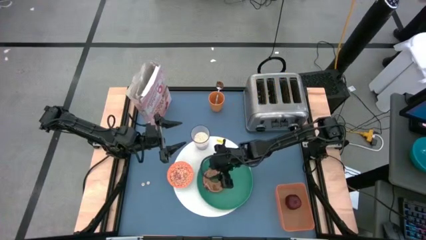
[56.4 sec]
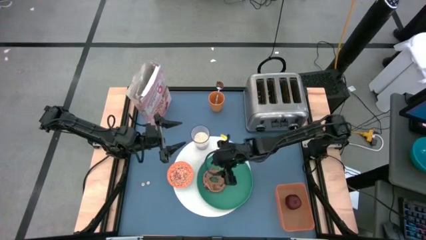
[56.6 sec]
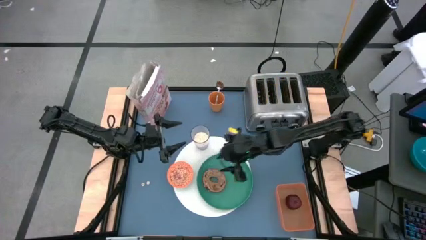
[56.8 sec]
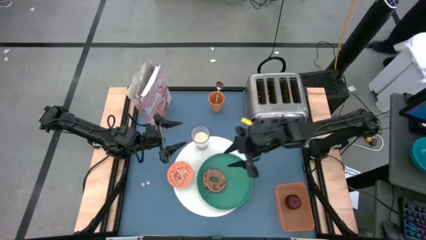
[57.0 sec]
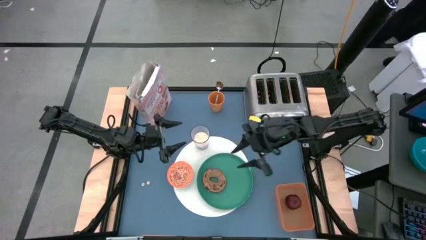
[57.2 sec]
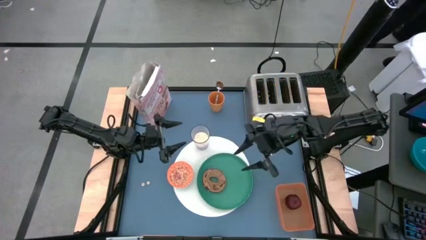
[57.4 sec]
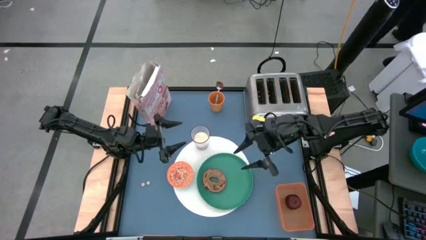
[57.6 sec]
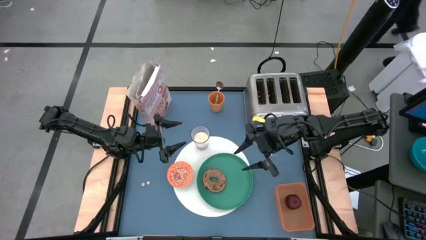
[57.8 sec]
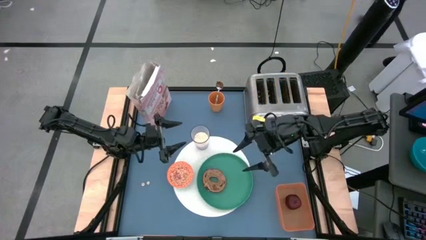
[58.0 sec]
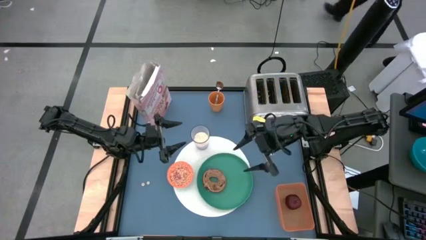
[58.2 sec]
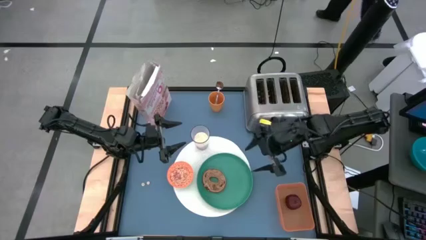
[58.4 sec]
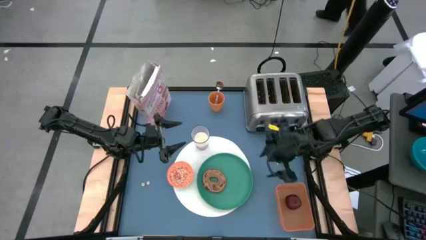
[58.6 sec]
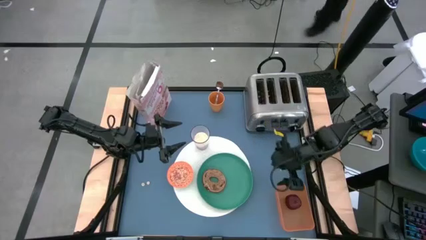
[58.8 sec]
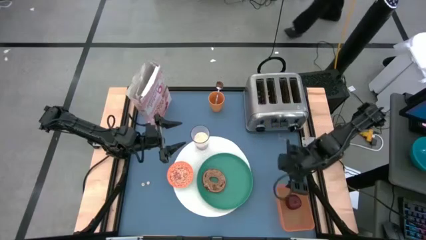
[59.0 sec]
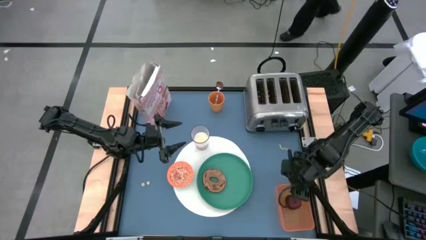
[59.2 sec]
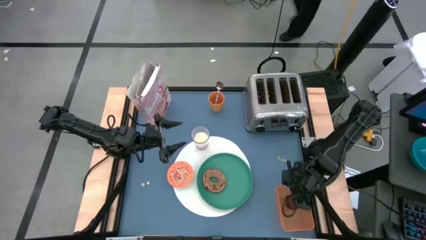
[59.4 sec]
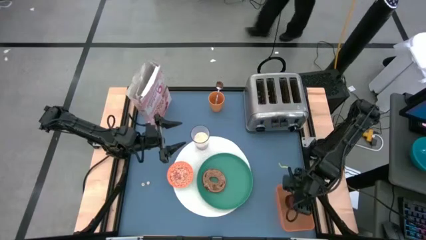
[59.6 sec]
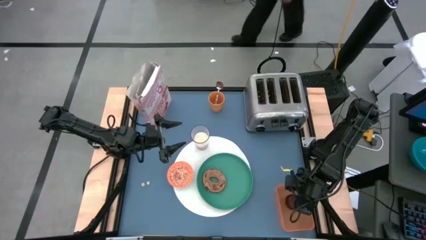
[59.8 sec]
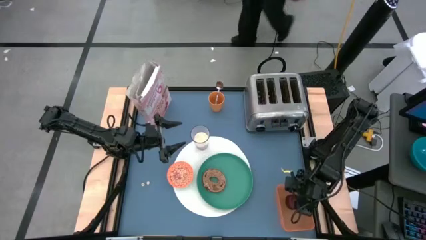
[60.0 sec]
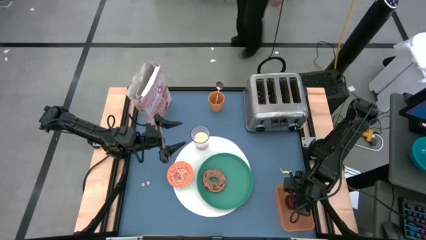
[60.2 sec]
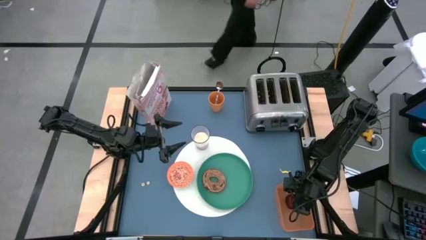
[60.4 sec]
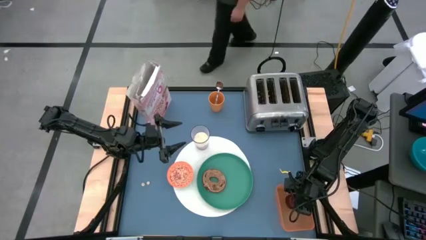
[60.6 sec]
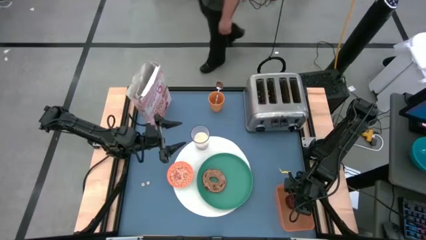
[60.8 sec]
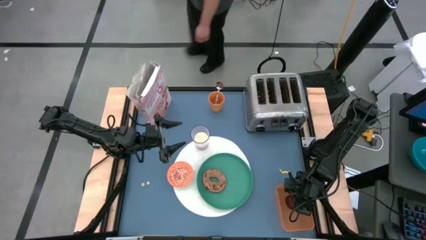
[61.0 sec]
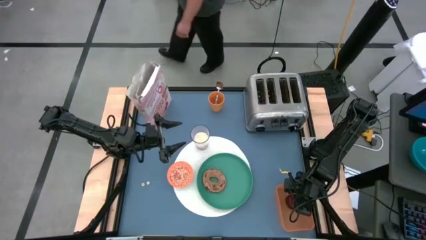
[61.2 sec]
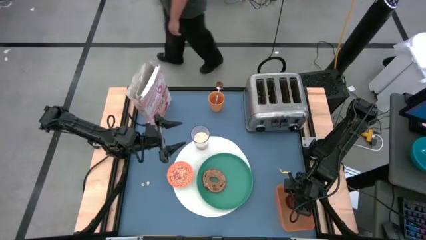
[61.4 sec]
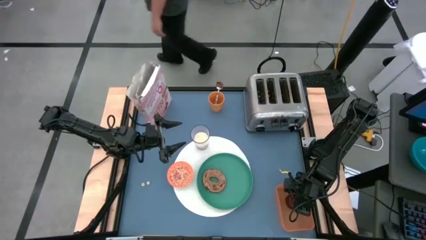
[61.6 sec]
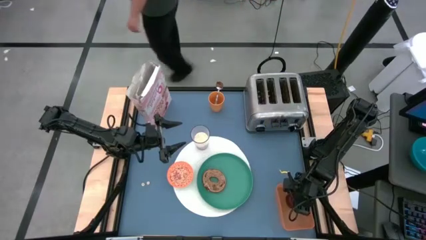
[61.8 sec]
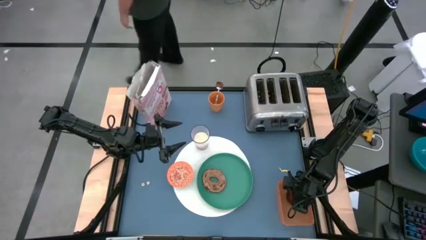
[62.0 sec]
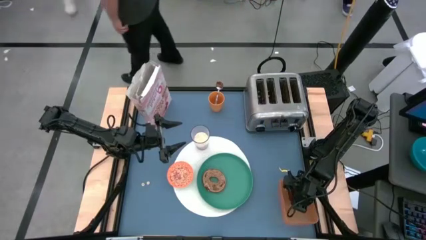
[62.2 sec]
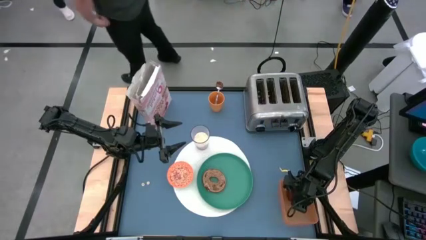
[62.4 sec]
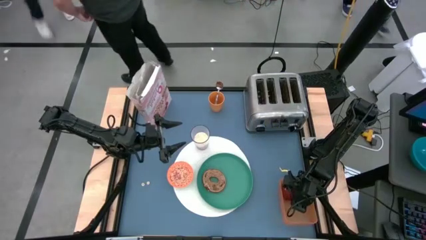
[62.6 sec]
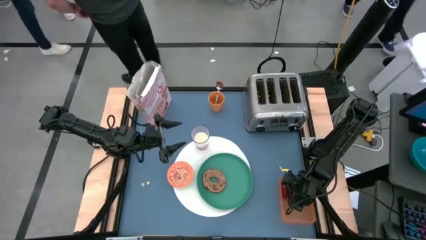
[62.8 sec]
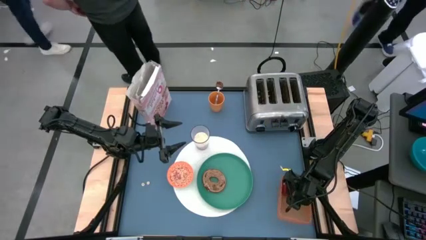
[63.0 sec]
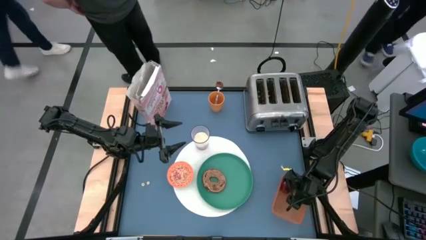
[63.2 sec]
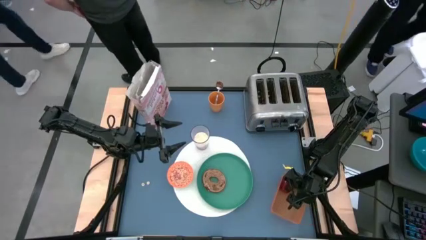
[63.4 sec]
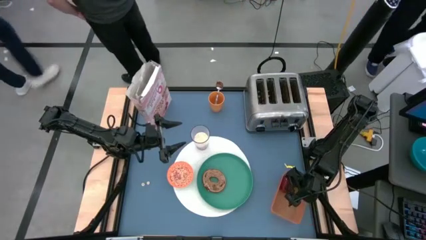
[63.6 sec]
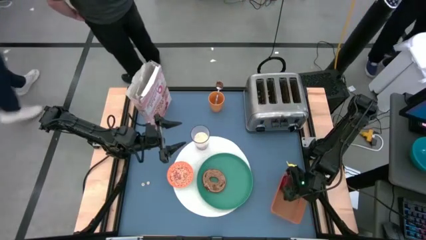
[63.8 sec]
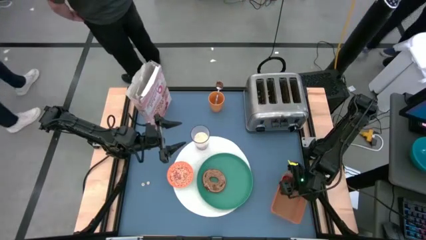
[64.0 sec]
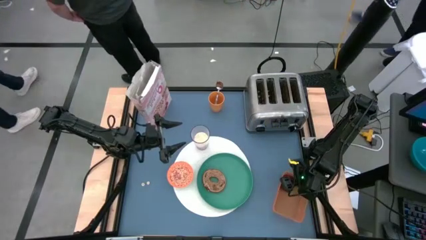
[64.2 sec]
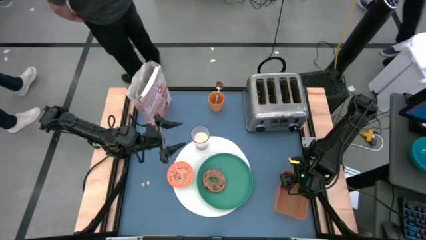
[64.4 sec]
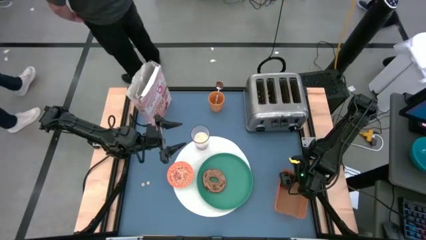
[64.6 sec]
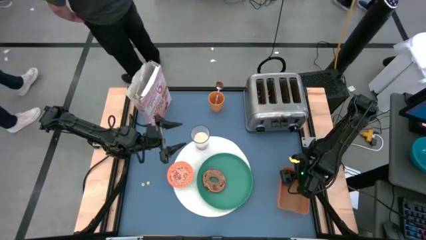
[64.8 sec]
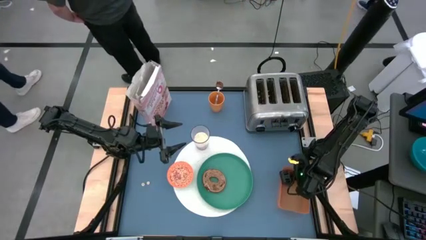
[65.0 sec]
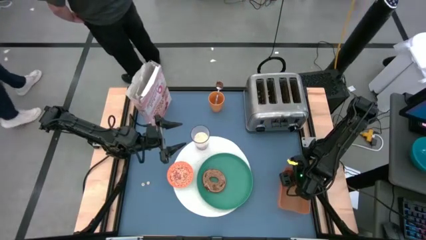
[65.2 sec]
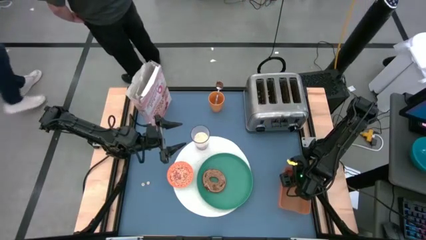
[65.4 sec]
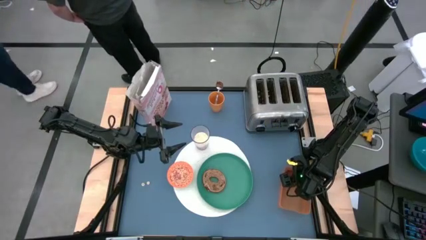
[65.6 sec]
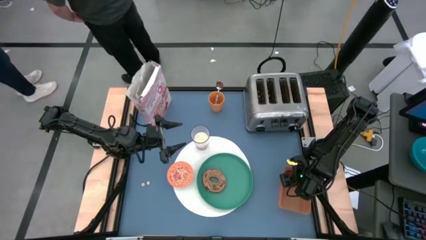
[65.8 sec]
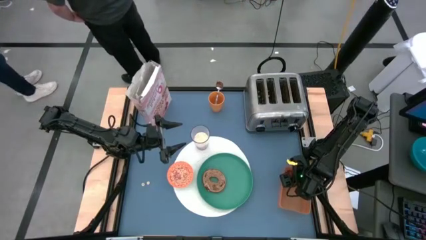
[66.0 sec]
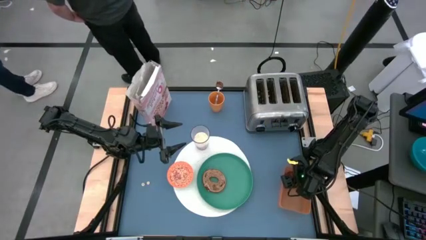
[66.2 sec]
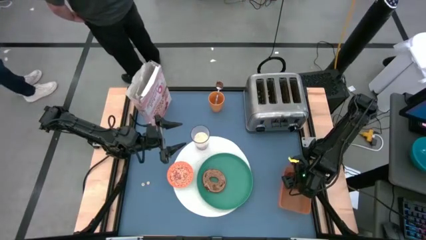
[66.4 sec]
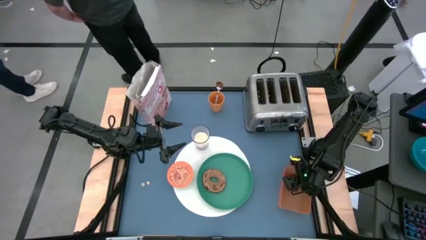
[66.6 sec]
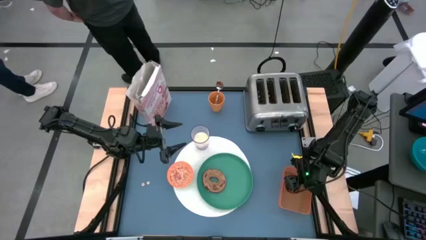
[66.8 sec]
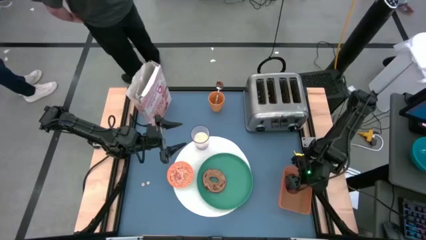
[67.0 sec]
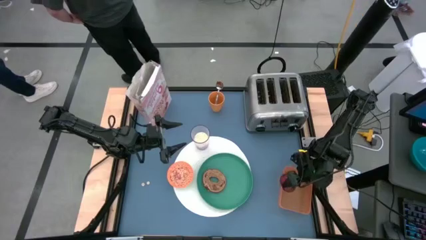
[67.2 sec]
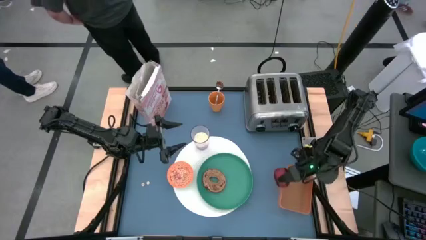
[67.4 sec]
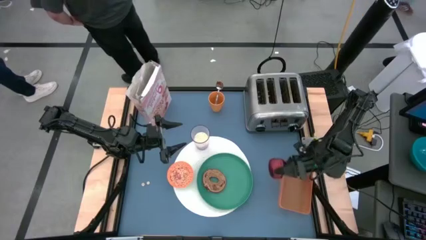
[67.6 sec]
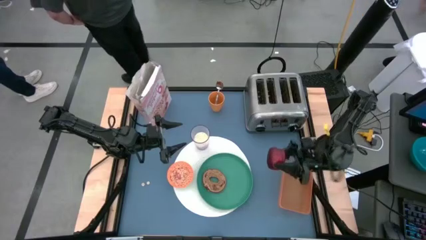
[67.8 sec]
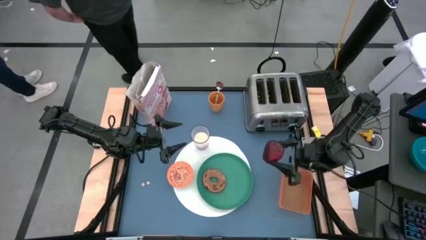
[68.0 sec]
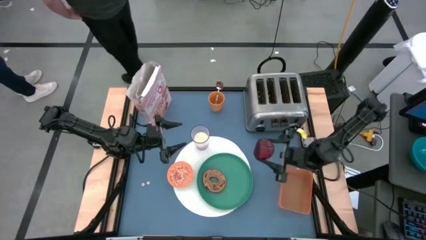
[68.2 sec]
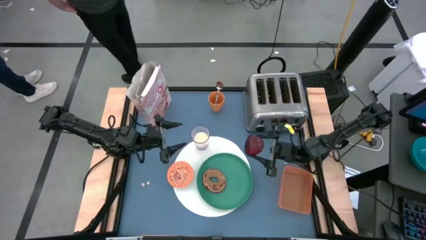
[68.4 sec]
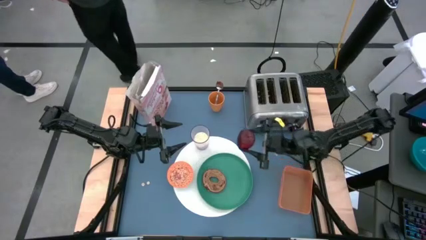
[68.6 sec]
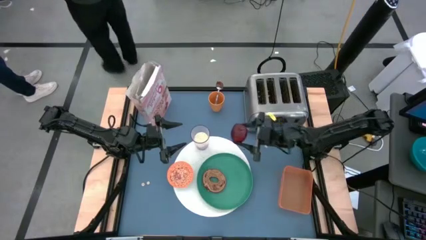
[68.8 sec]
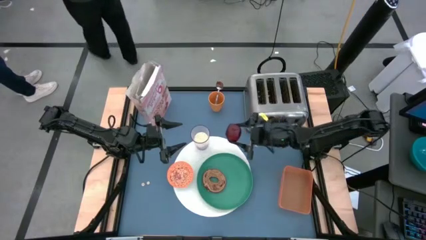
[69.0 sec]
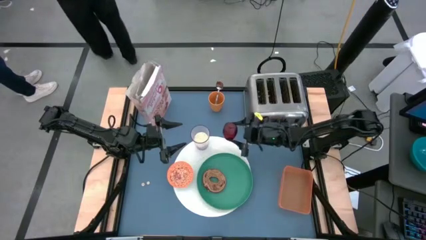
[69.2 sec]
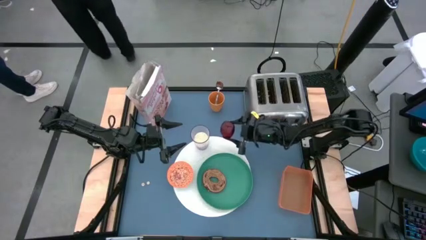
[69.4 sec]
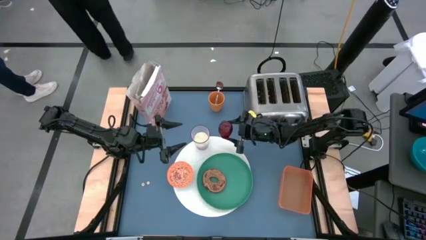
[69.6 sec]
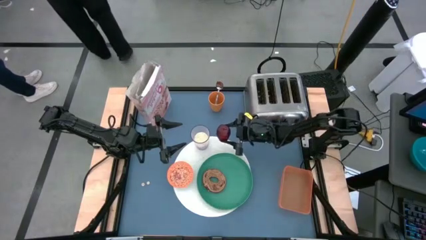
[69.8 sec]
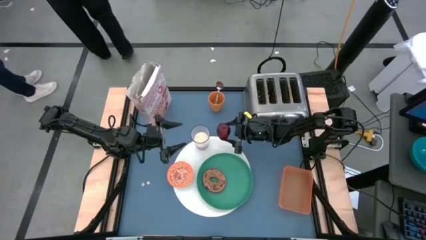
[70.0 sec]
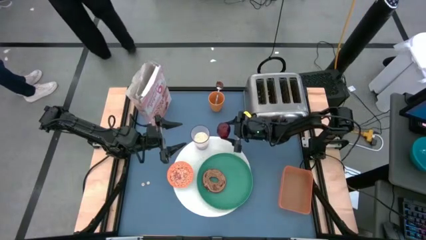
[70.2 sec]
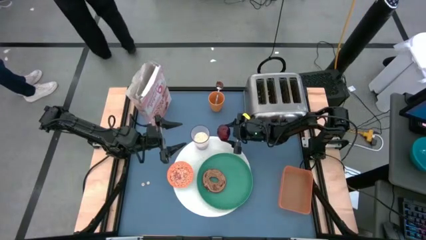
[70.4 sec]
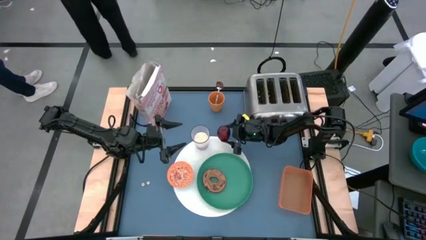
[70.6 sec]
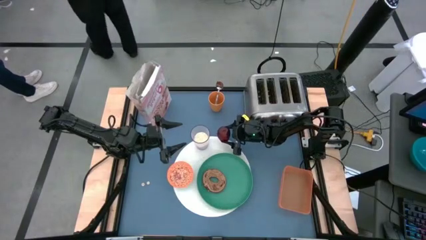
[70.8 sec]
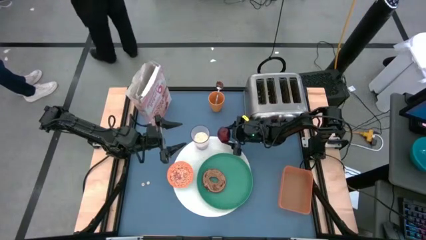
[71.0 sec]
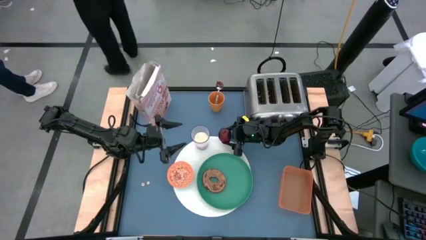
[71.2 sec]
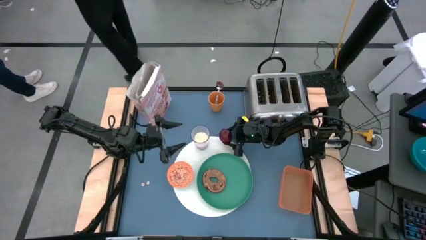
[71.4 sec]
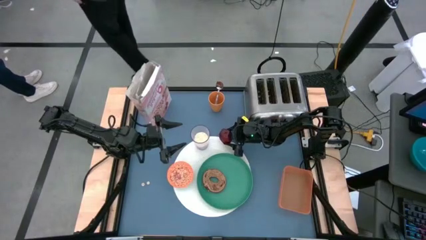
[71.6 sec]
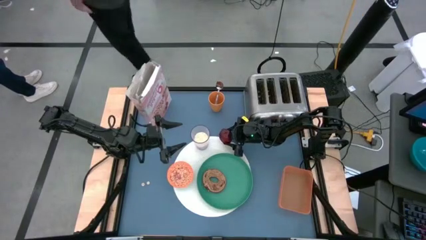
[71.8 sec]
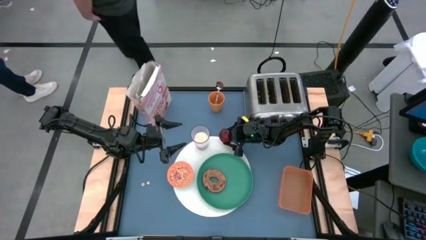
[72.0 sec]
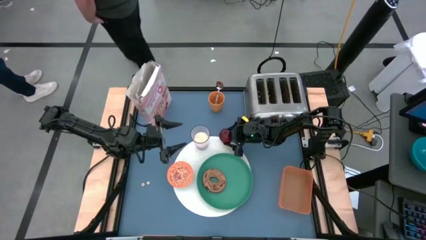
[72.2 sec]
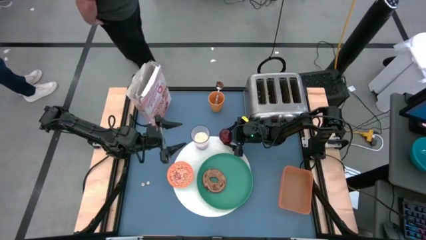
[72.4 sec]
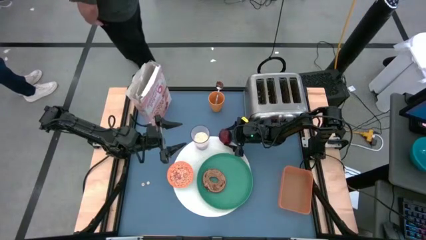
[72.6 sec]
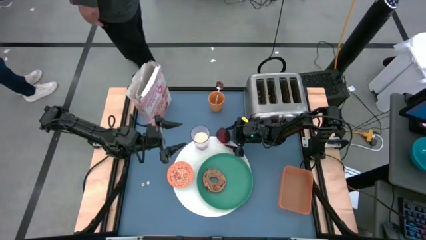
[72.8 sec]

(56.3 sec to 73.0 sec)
Task: Arrange a breakfast setting
Put the red apple on the white placemat on the right of the cup of milk
